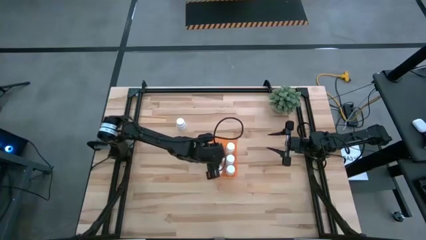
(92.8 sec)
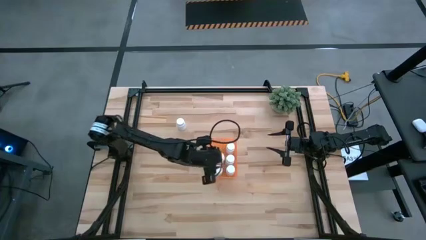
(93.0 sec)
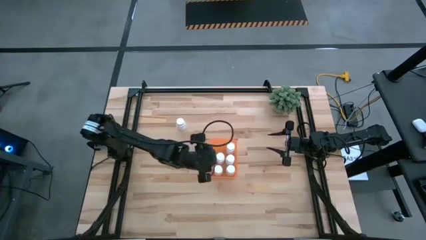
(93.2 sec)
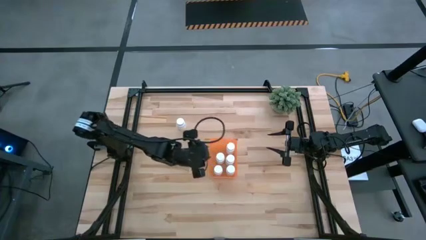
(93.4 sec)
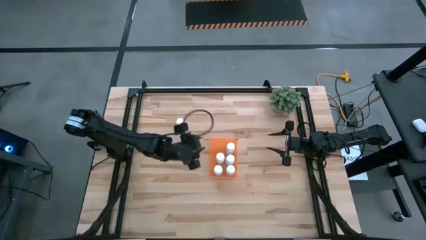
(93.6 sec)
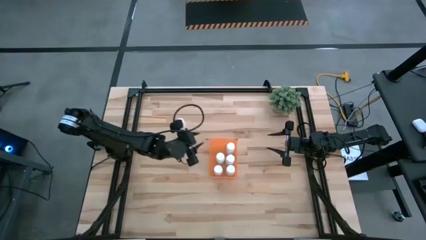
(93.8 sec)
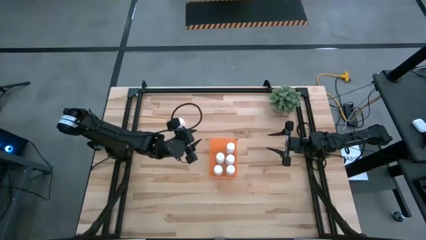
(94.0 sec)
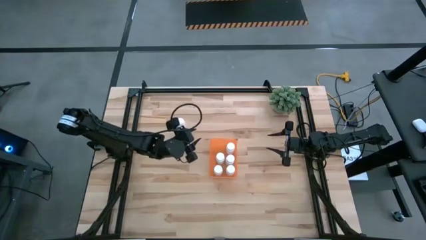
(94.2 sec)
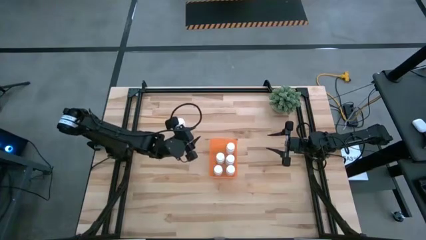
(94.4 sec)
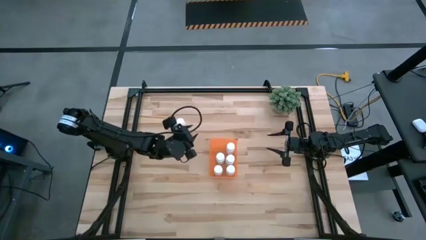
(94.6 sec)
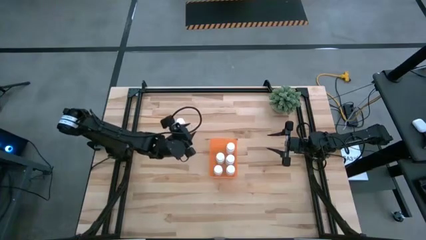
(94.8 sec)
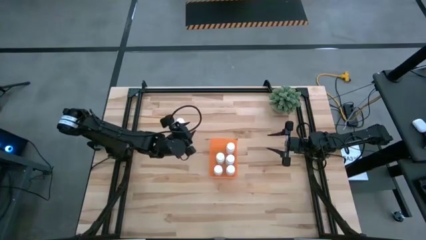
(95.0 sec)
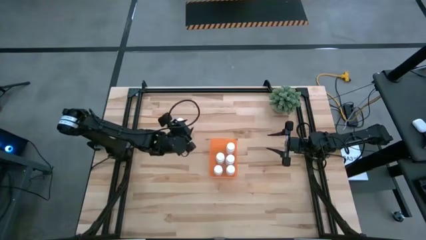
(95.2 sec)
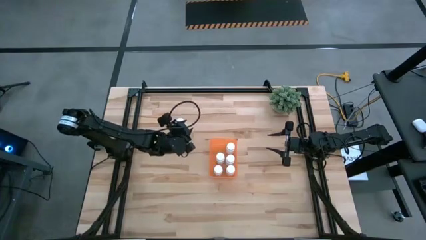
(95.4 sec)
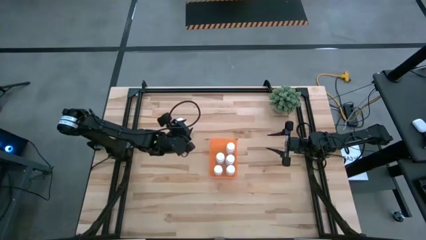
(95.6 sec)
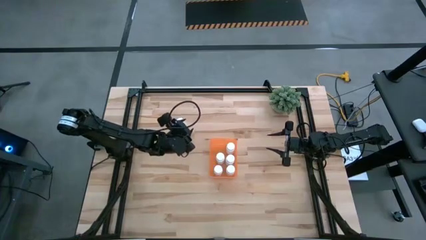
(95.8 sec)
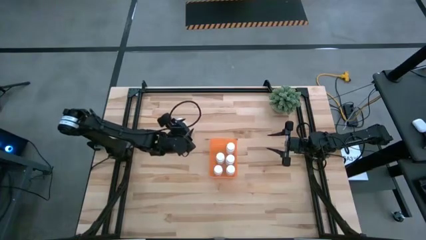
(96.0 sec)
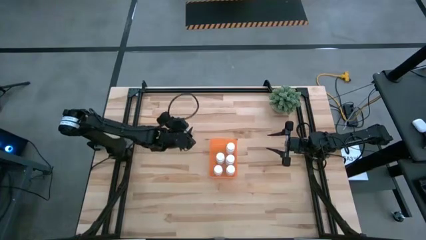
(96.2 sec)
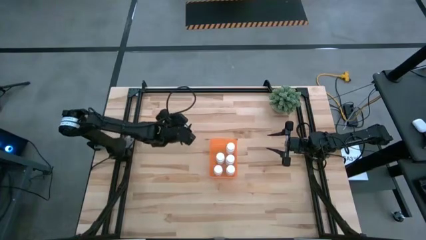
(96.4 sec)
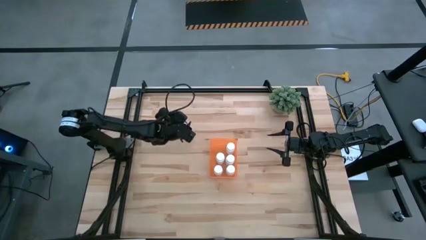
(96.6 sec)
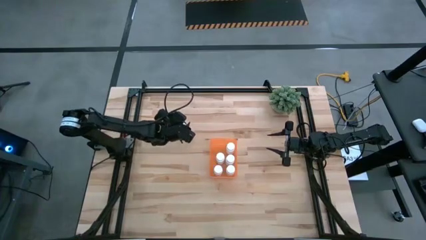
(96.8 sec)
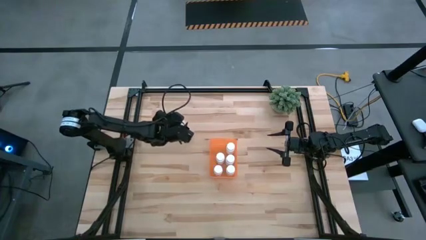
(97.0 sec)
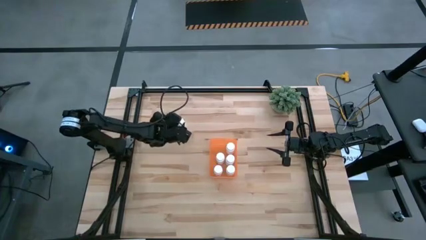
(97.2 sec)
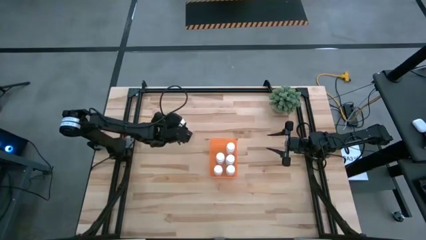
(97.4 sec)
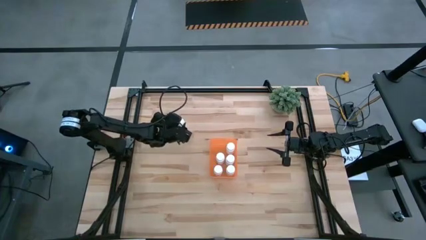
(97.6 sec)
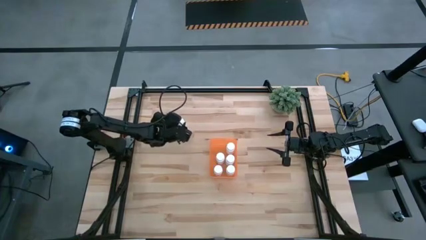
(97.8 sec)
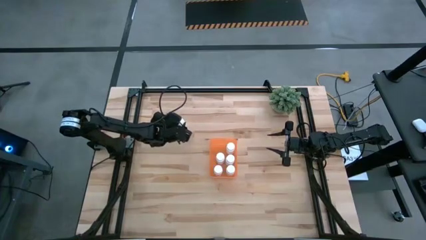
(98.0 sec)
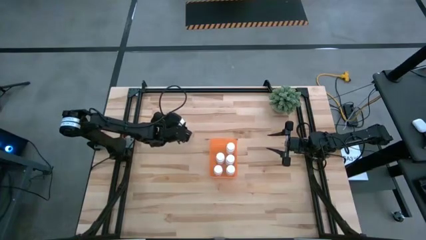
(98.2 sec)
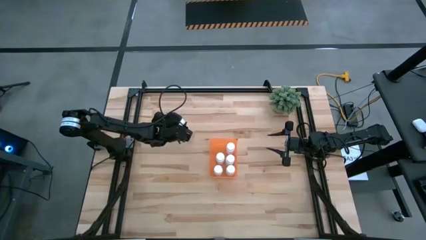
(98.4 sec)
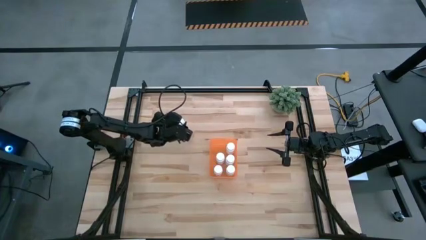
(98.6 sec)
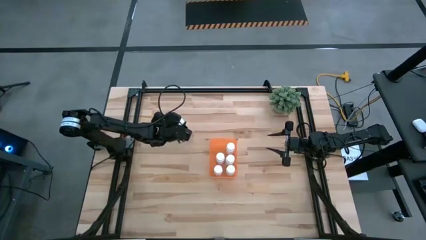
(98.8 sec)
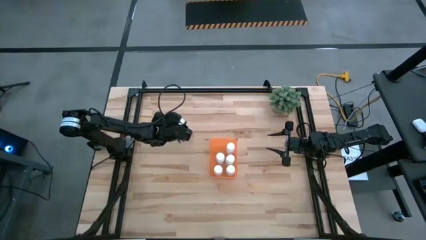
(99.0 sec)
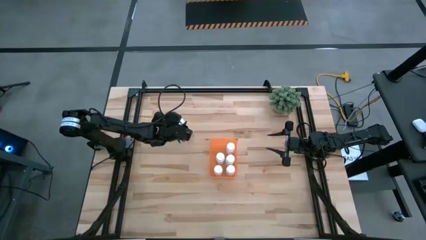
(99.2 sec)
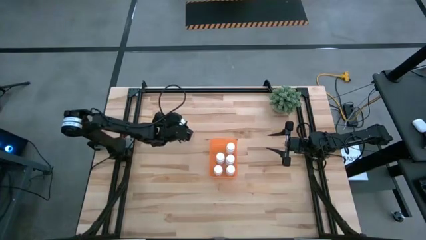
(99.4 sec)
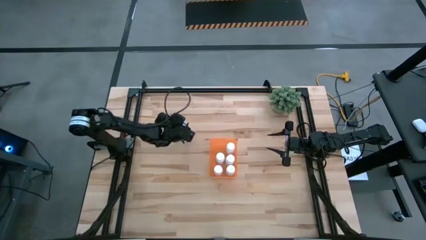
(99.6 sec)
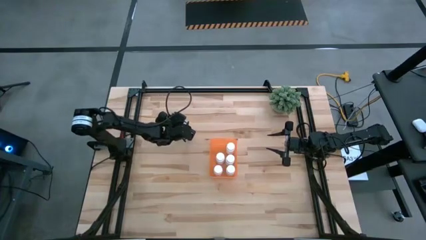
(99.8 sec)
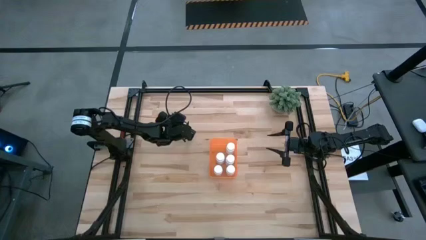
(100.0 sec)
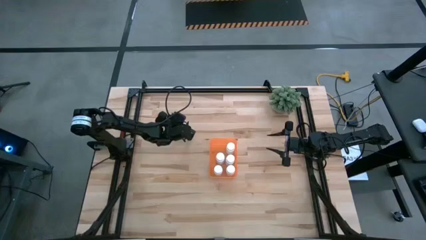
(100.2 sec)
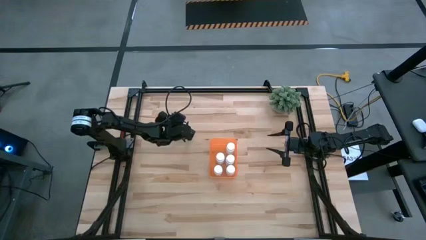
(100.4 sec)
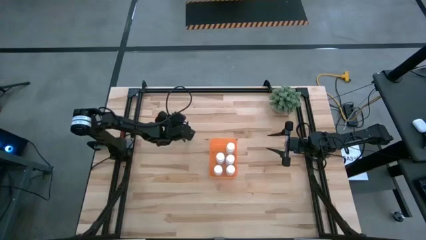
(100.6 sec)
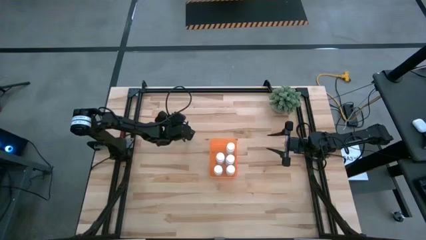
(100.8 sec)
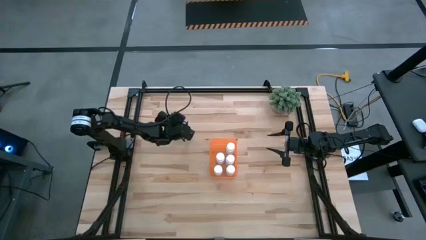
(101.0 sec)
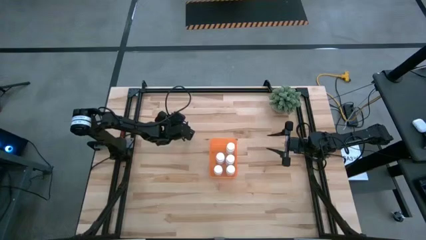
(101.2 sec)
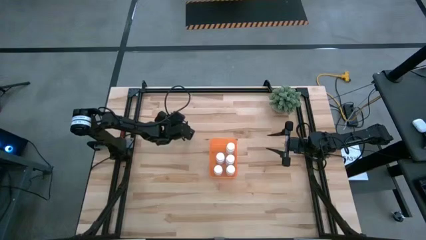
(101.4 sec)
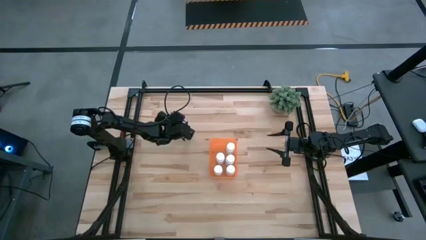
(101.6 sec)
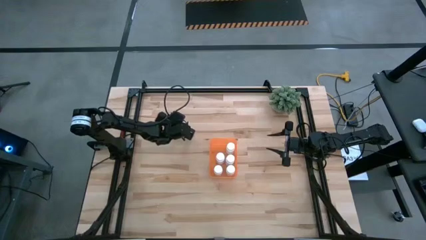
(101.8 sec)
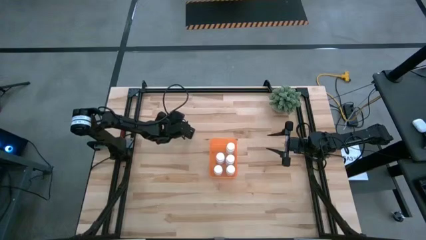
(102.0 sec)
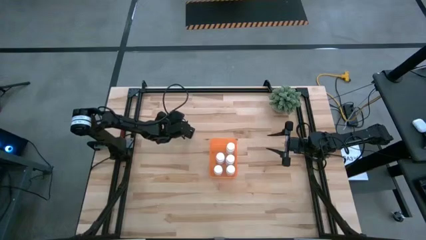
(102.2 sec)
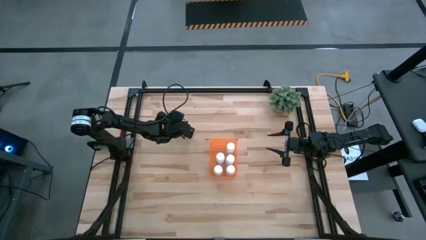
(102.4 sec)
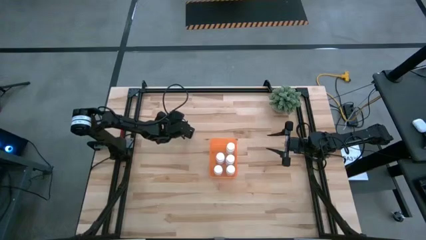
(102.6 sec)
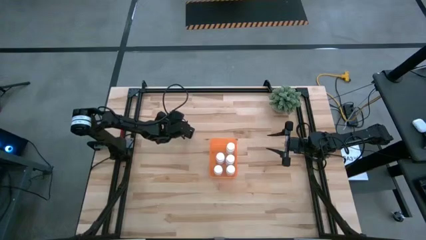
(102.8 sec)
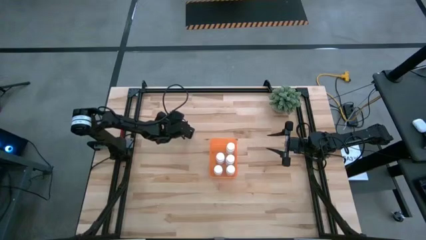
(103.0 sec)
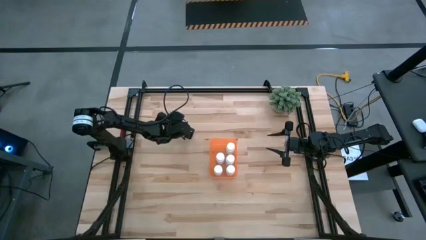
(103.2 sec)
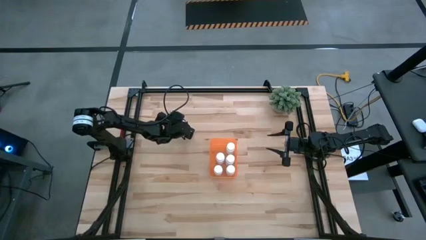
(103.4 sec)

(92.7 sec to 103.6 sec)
Task: Pick and place pill bottles into a basket
Put the white pill bottle into the orange bin

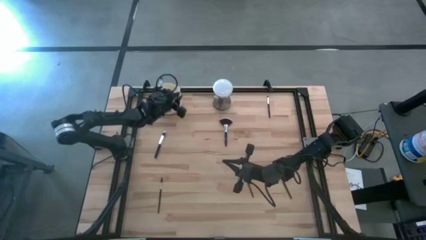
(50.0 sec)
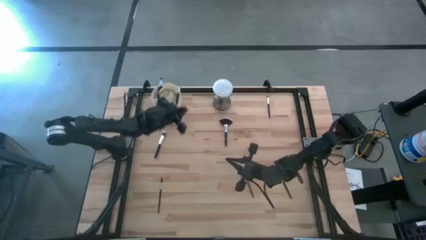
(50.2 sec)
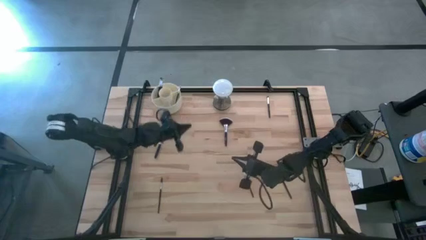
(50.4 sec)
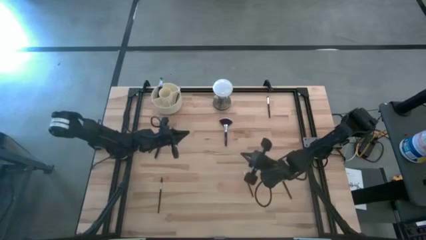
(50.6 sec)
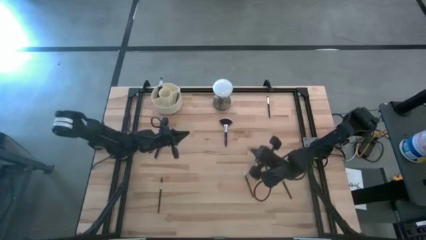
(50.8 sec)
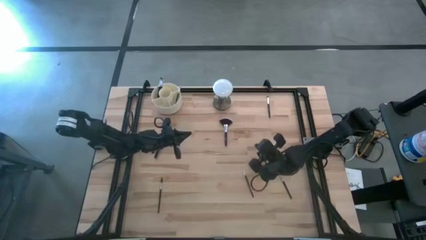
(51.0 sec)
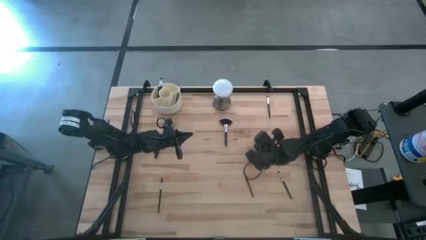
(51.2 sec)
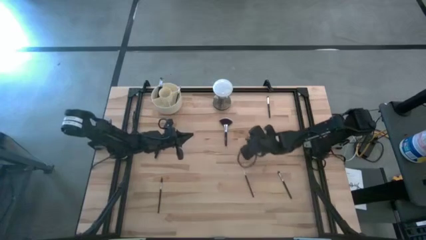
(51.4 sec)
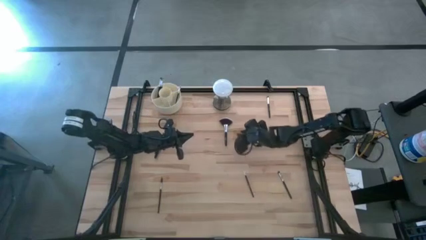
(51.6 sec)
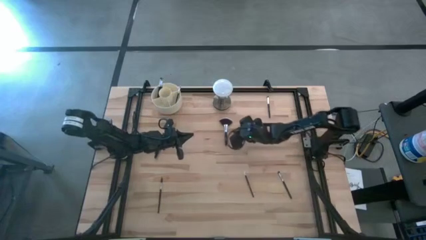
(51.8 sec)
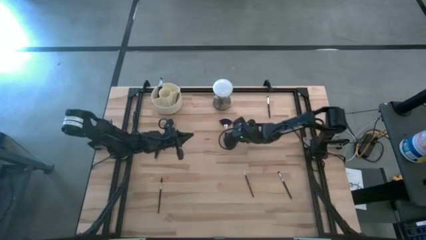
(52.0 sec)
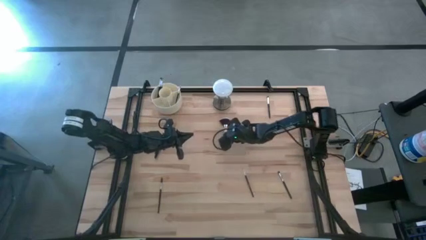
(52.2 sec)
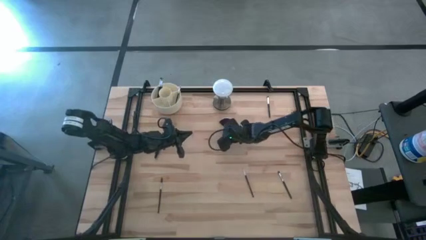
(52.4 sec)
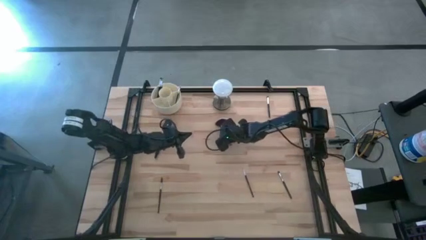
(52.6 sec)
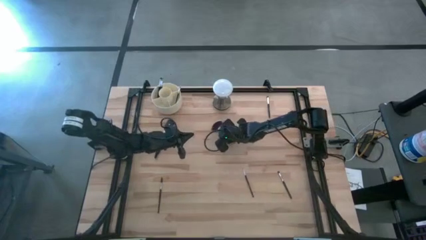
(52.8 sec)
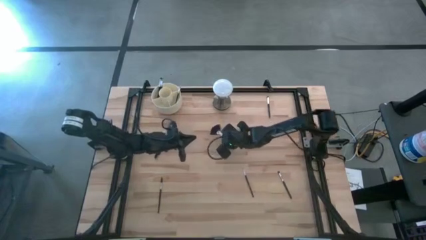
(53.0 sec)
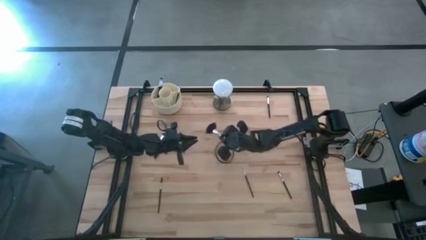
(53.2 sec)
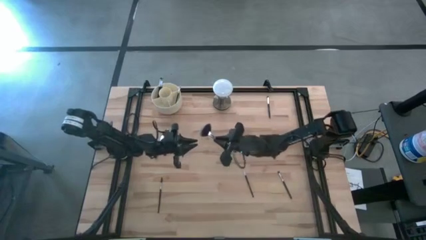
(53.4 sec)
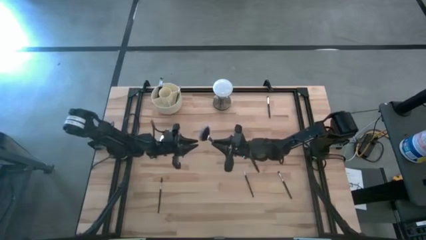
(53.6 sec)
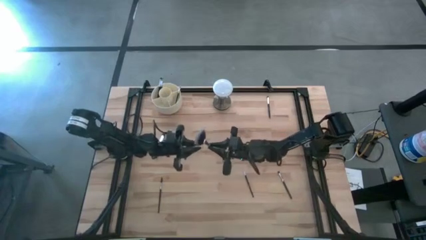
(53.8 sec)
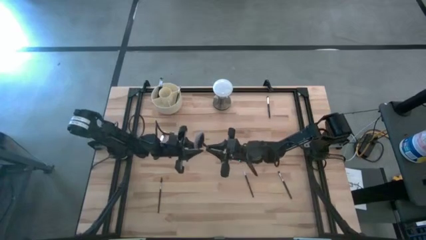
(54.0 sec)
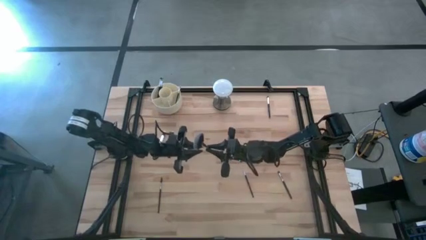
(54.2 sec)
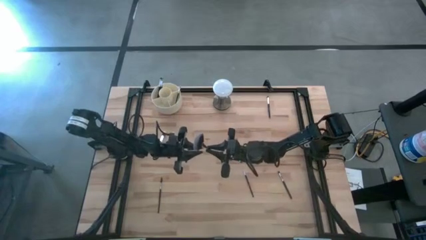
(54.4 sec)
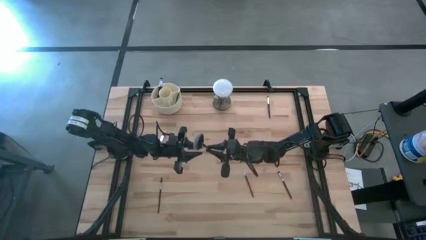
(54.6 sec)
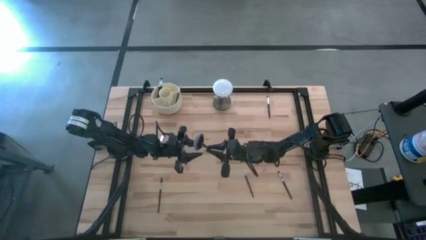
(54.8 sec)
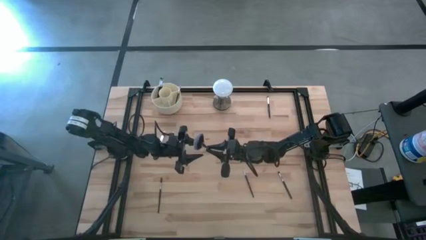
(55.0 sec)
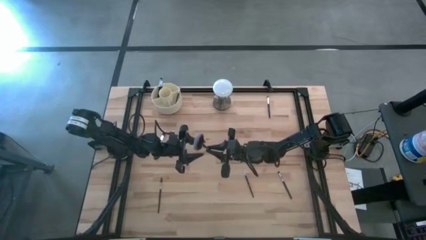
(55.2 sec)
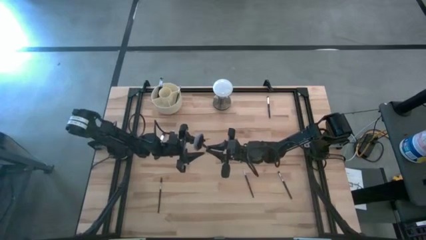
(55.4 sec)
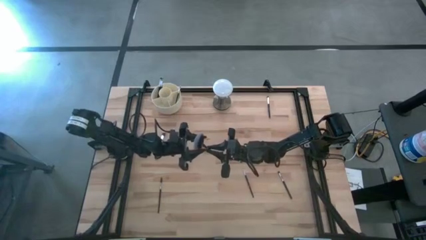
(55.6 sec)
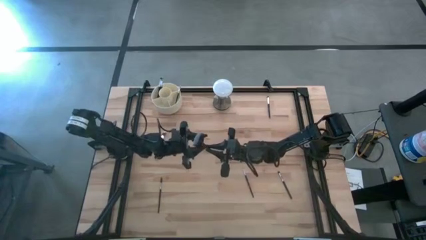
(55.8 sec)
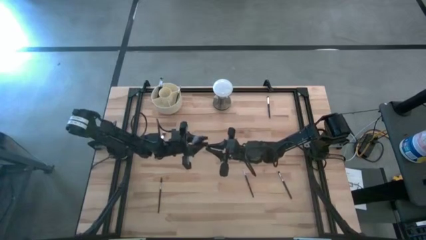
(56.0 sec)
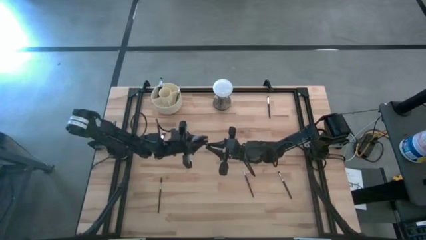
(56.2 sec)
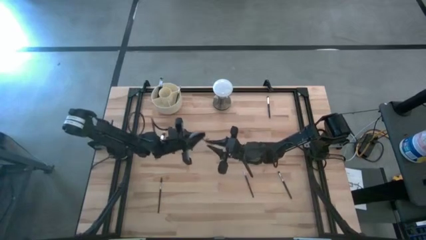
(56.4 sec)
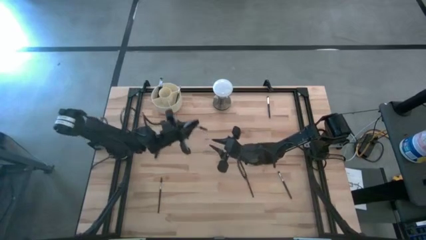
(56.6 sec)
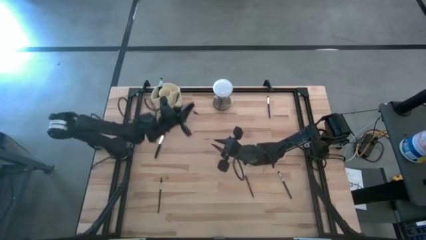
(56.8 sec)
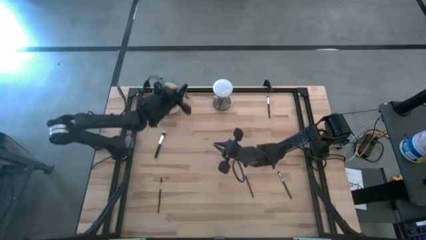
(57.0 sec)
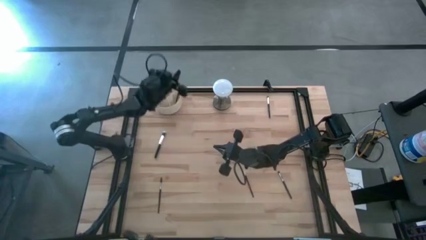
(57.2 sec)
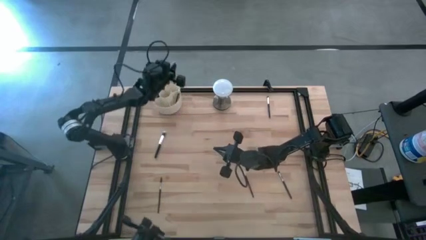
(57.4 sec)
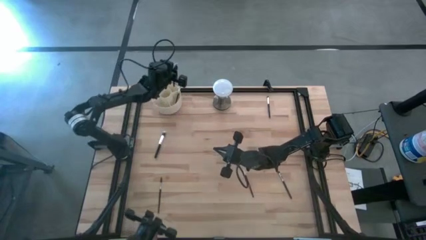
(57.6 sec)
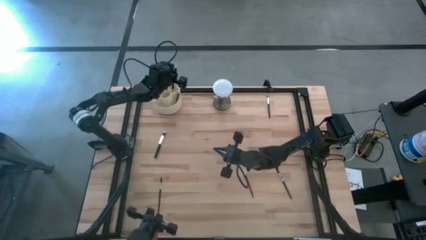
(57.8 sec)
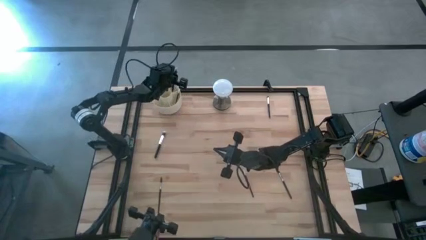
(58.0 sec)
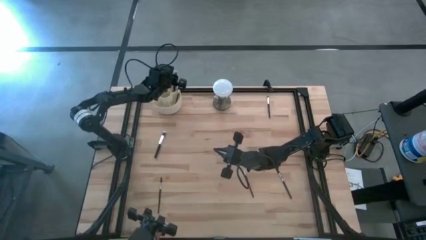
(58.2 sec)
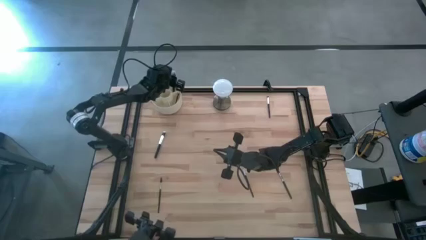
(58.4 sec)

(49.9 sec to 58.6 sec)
Task: Put items in baskets/containers
Put the highlighter brush into the organizer
